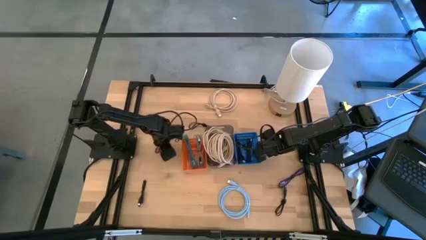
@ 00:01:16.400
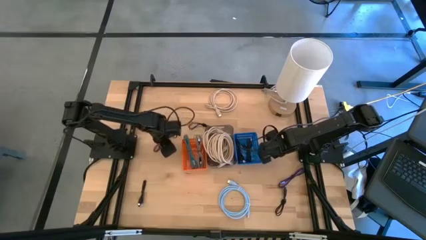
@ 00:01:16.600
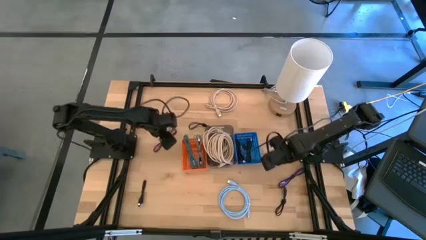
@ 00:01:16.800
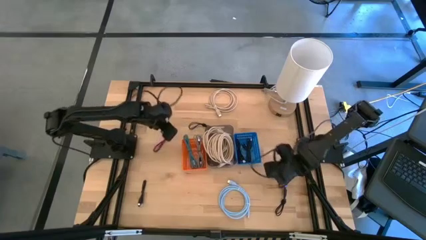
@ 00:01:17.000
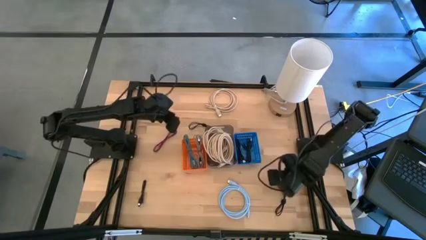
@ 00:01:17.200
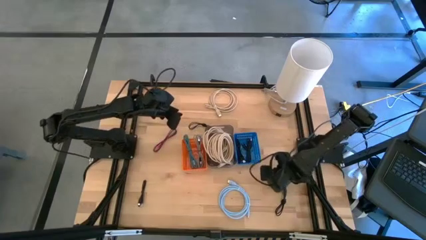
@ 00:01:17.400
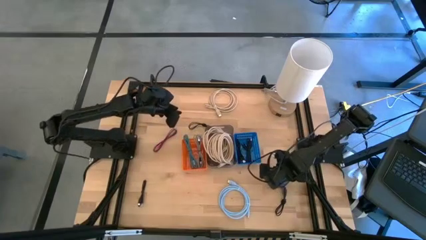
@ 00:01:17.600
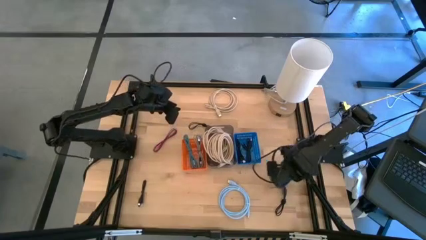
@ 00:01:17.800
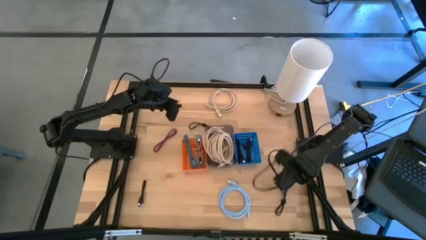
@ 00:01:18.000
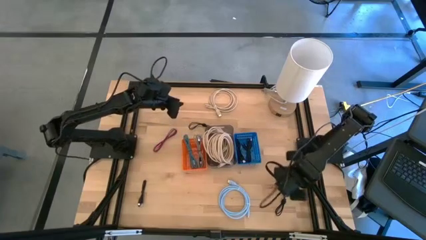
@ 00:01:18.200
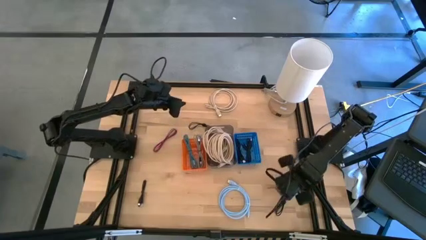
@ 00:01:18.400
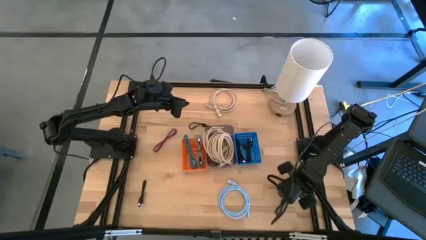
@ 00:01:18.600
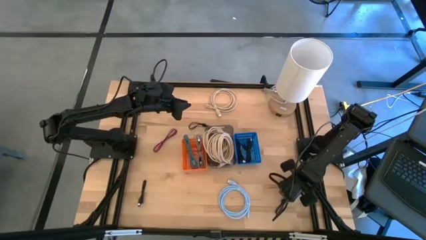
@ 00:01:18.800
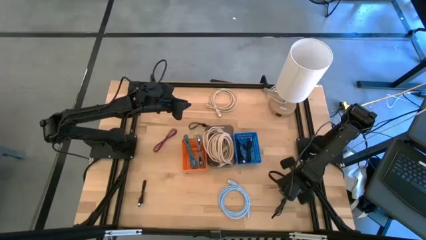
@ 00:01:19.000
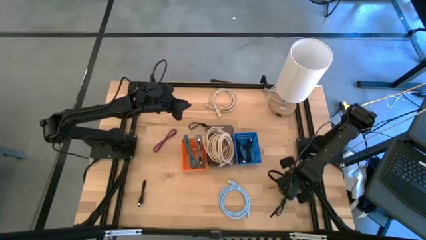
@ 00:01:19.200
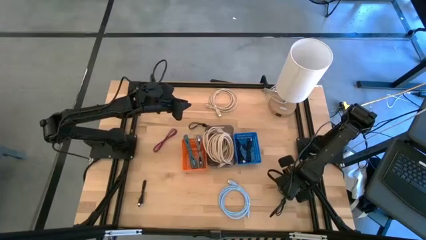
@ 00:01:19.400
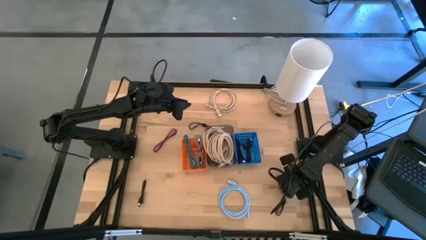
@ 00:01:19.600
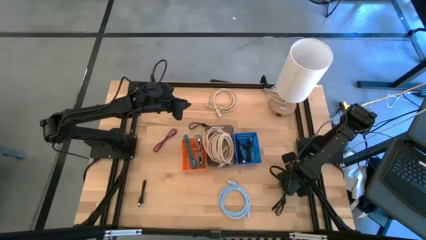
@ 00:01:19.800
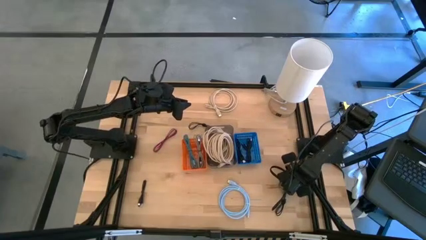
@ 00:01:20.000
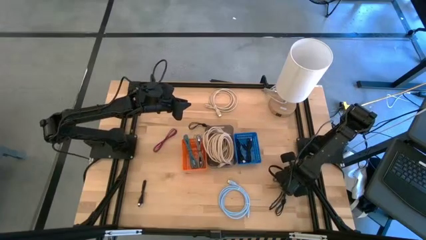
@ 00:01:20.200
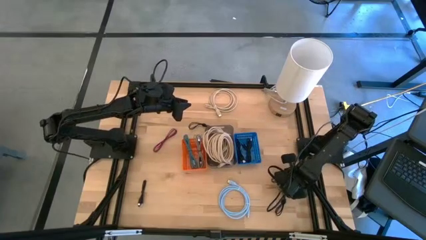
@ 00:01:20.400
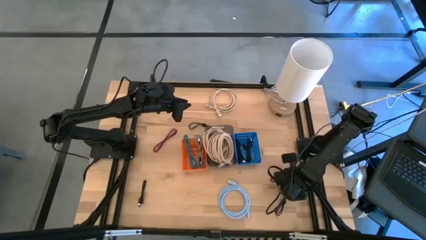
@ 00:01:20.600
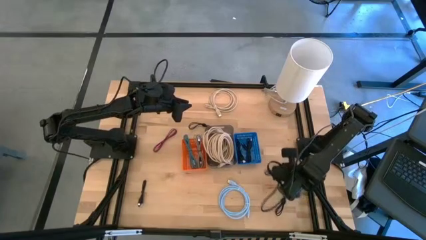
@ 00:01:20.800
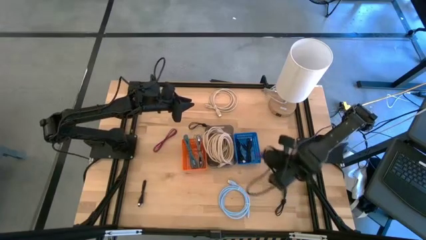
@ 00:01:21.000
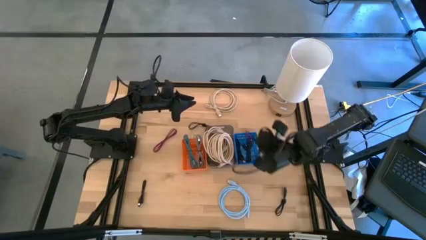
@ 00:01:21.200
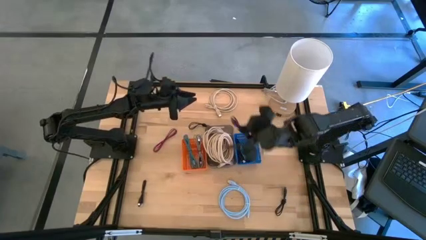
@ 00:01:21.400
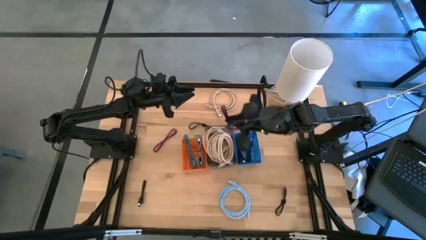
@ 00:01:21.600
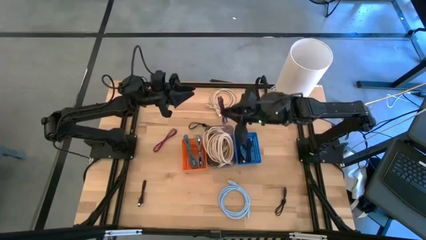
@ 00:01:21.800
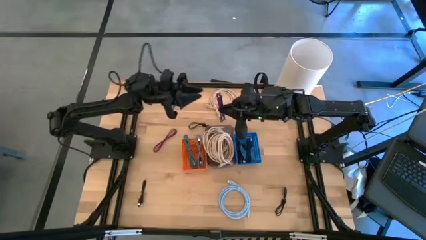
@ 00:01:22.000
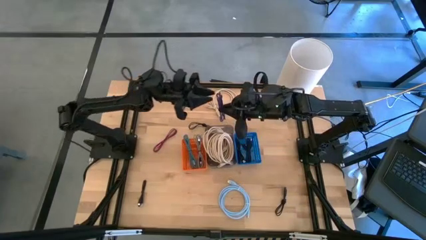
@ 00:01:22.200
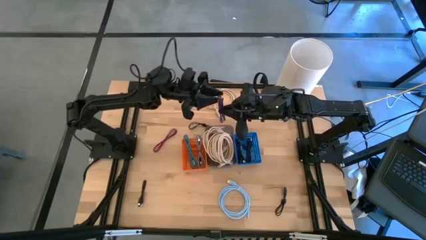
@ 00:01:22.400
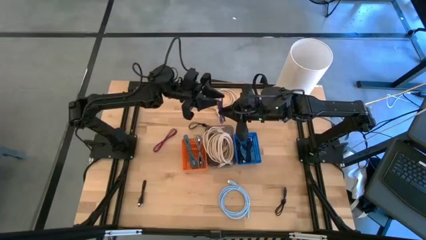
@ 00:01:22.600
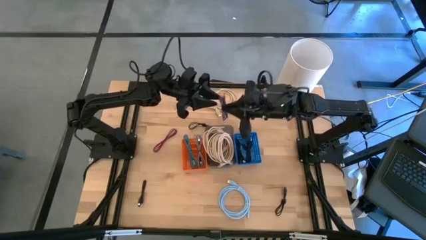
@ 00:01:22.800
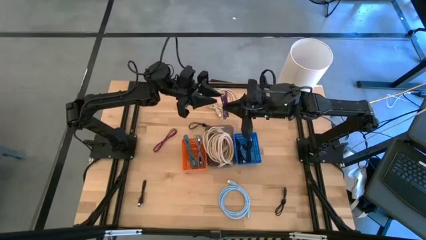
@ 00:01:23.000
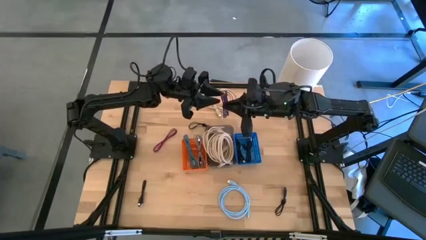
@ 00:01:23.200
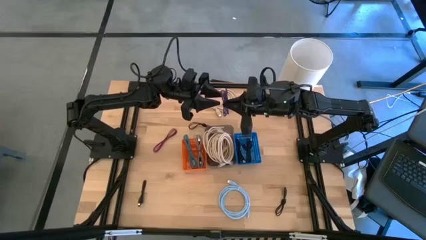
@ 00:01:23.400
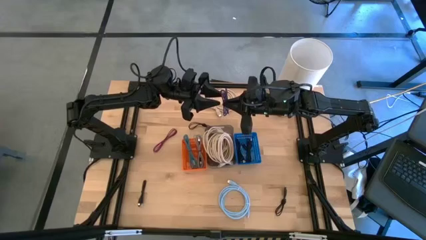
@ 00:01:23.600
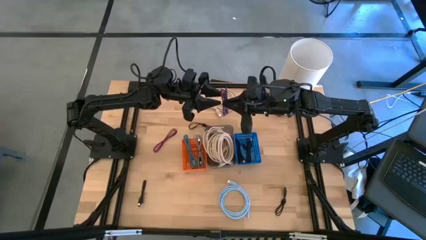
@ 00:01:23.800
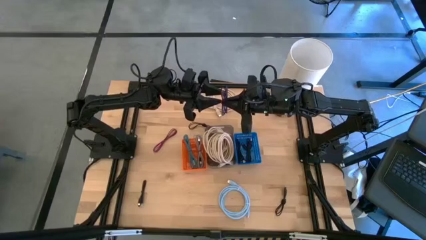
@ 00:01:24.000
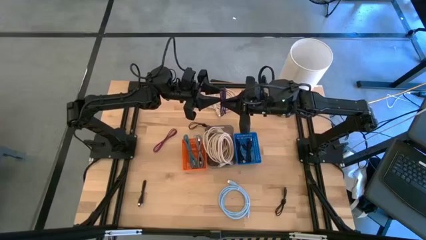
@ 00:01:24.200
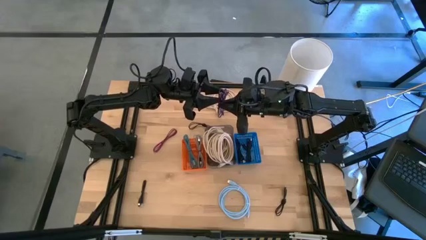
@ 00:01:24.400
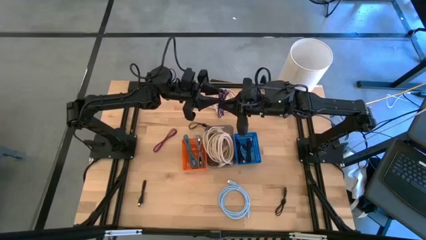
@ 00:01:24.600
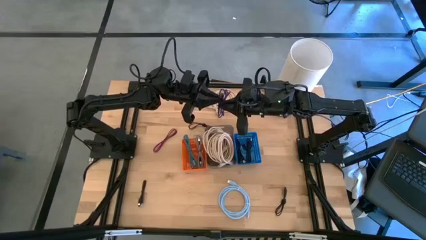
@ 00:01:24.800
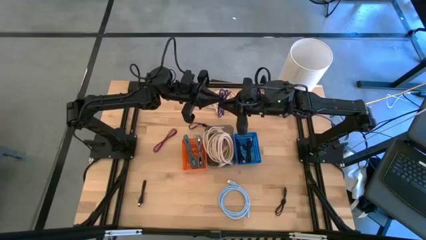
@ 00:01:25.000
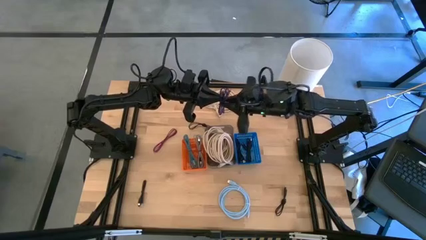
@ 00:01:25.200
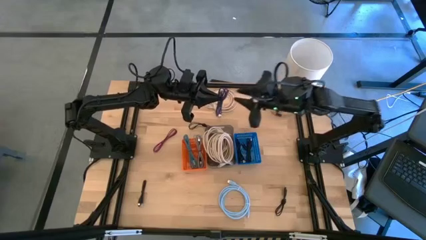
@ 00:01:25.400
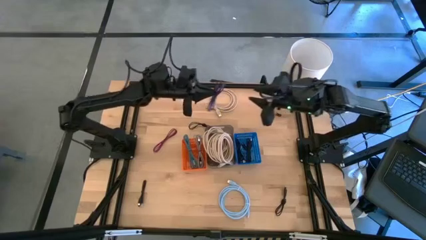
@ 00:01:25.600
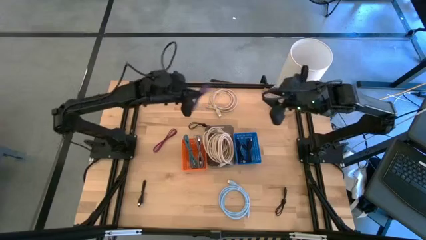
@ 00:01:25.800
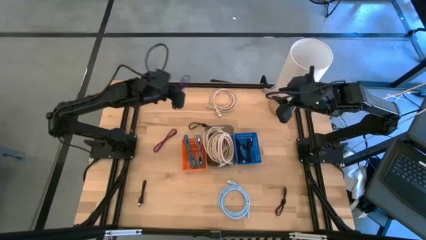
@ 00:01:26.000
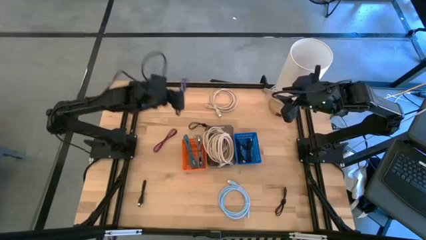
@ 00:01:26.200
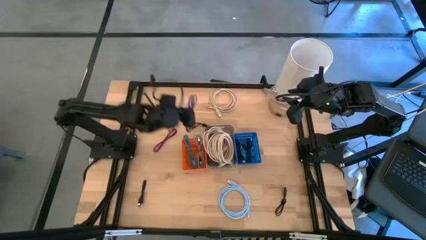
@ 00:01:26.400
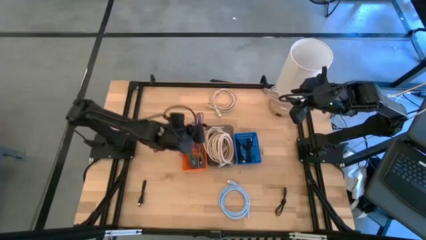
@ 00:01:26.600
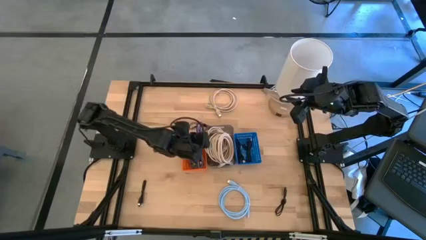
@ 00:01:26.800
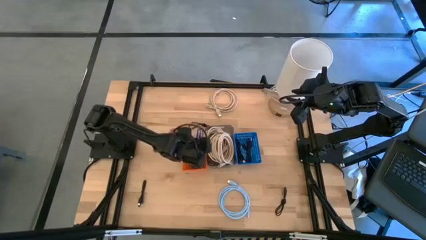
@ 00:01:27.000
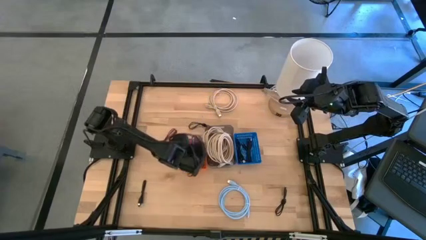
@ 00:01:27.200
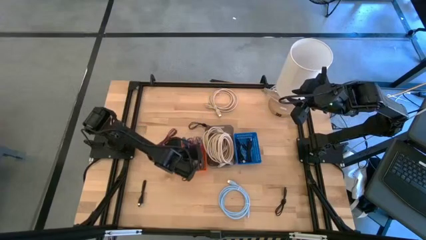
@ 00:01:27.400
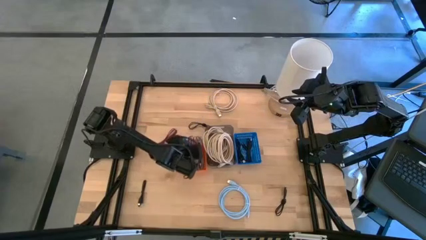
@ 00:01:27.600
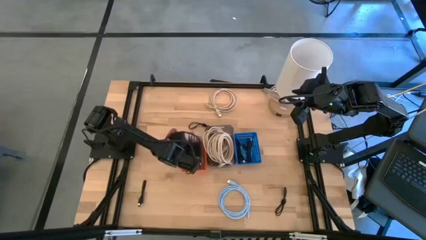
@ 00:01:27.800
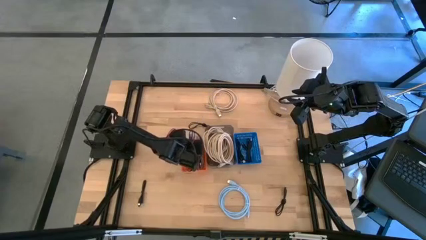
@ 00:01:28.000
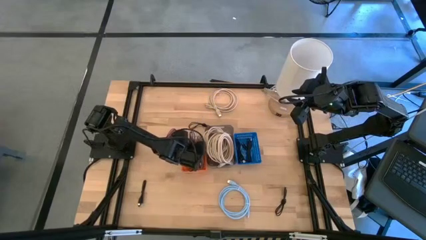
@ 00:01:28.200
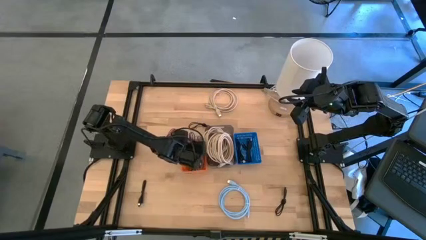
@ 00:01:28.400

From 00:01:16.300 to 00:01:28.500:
Task: Pick & Place USB Port
Put the black and violet charger cable into the orange bin
